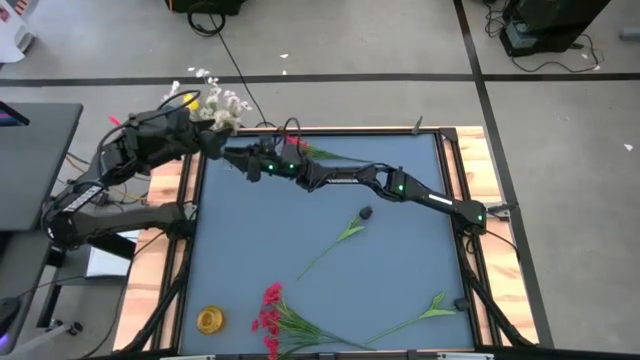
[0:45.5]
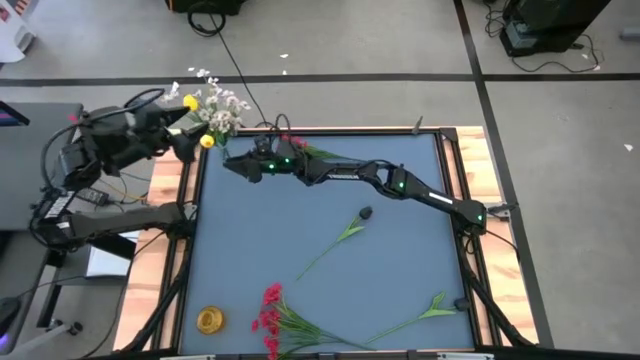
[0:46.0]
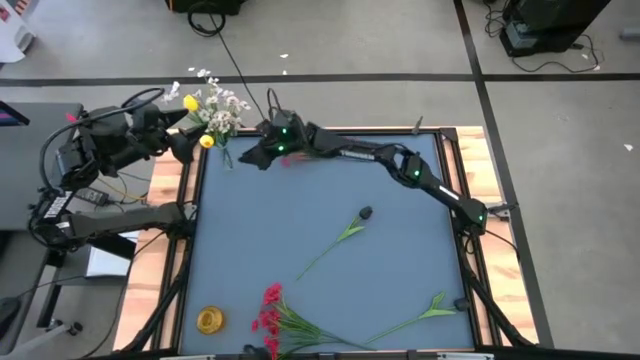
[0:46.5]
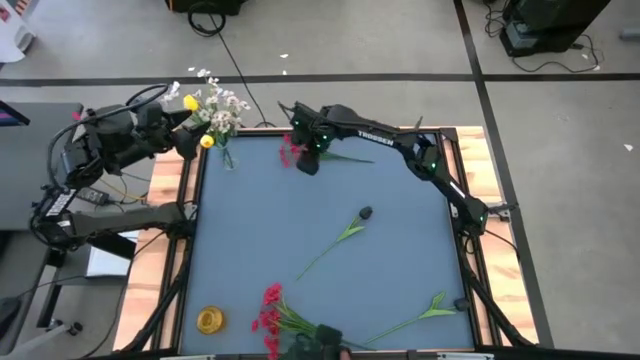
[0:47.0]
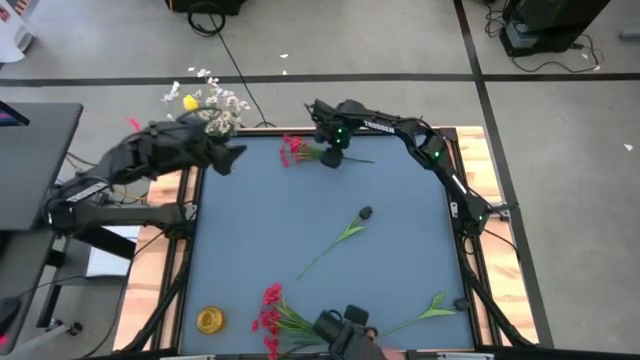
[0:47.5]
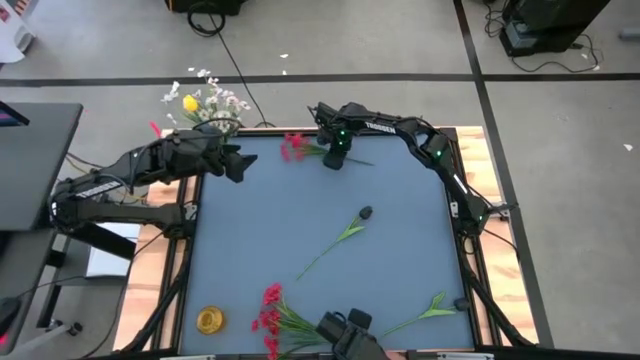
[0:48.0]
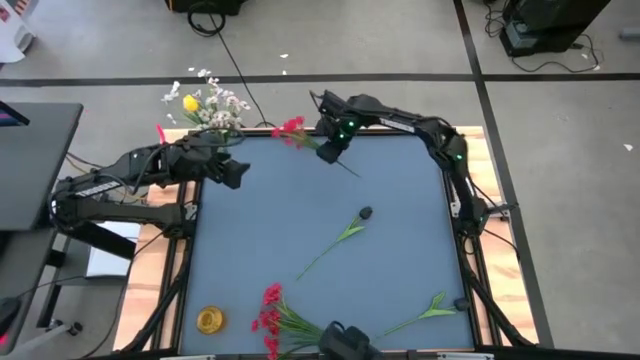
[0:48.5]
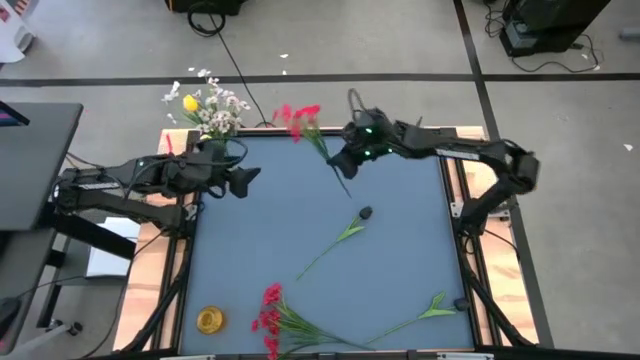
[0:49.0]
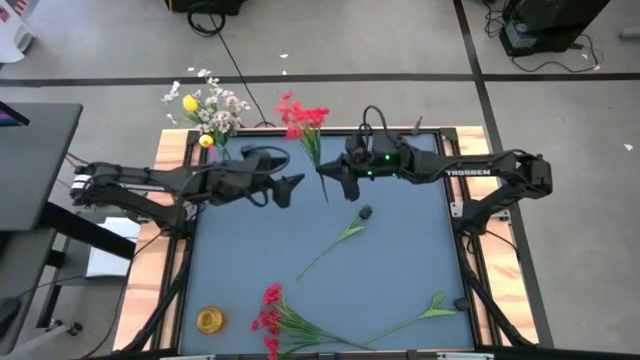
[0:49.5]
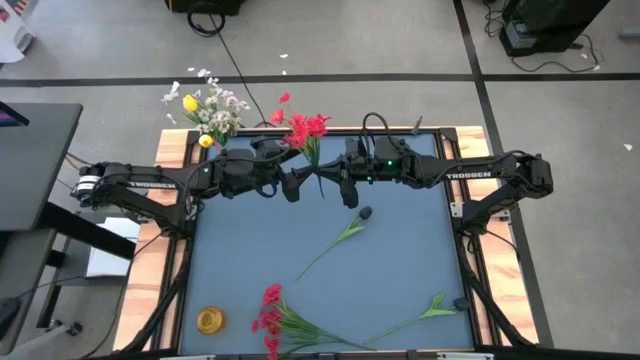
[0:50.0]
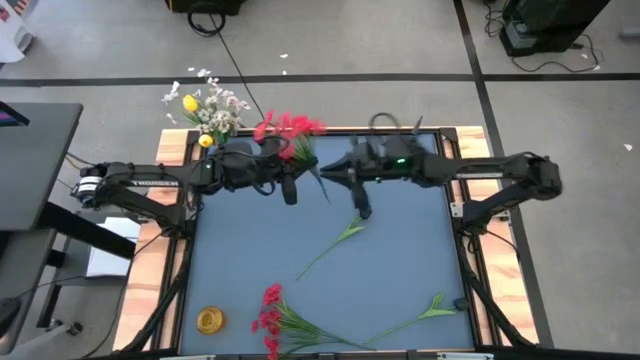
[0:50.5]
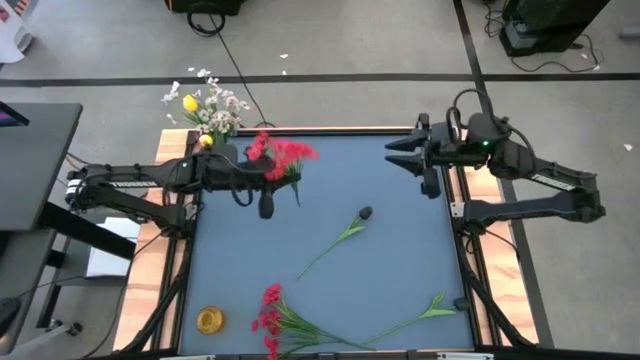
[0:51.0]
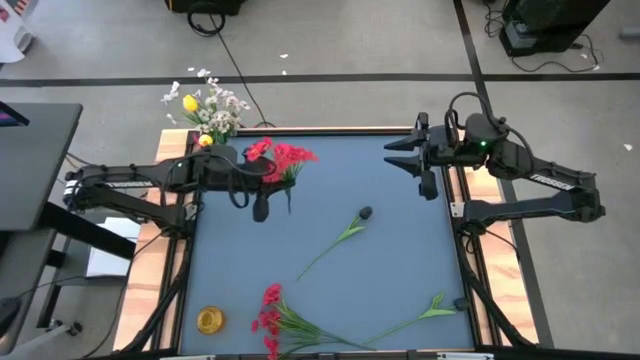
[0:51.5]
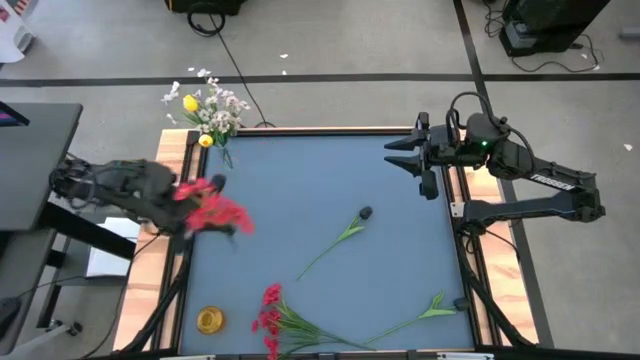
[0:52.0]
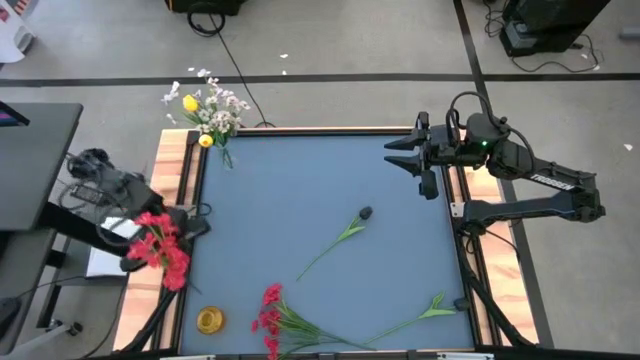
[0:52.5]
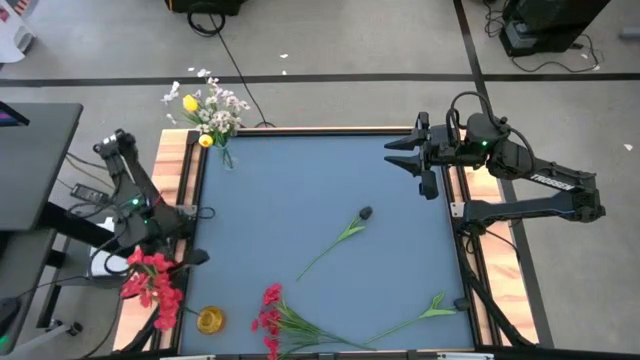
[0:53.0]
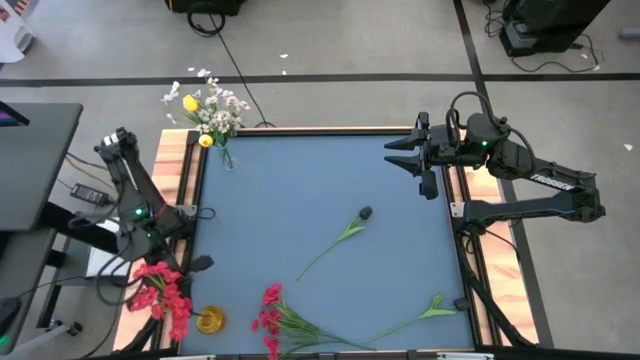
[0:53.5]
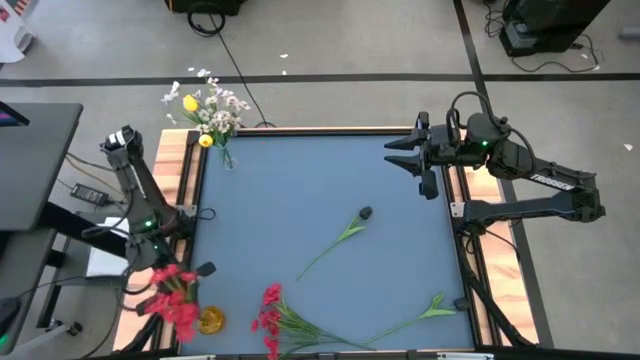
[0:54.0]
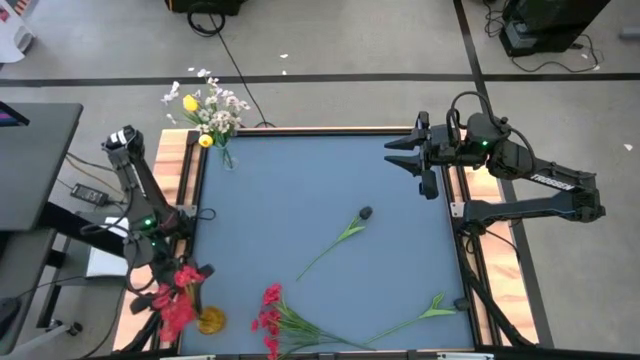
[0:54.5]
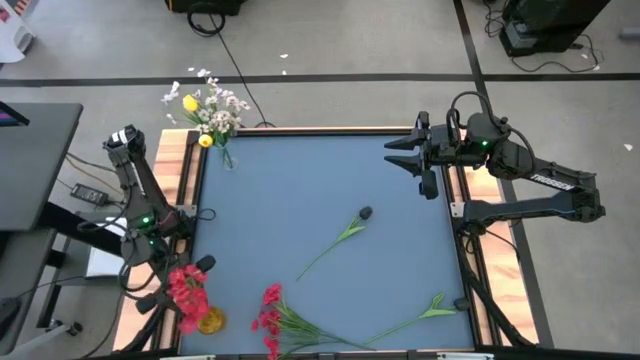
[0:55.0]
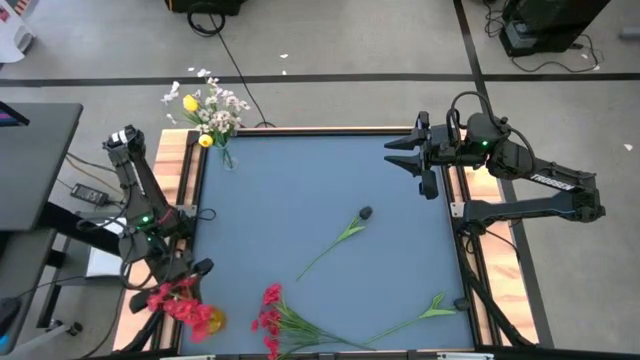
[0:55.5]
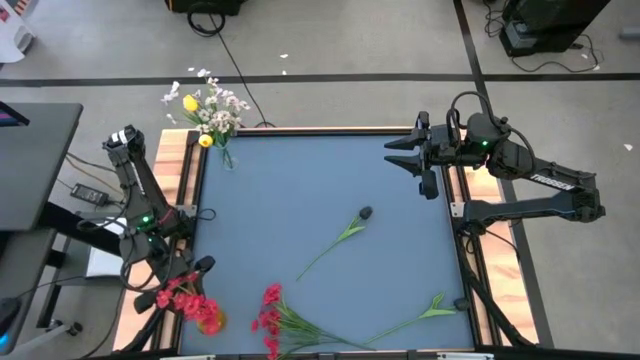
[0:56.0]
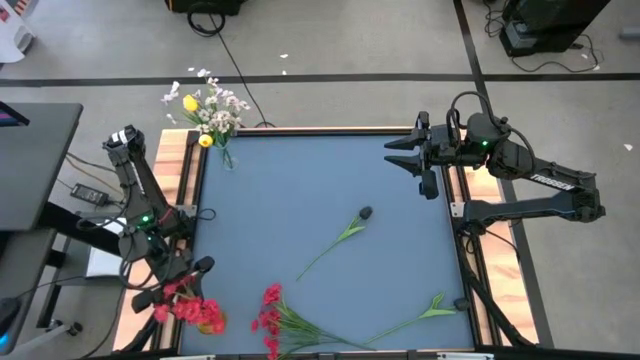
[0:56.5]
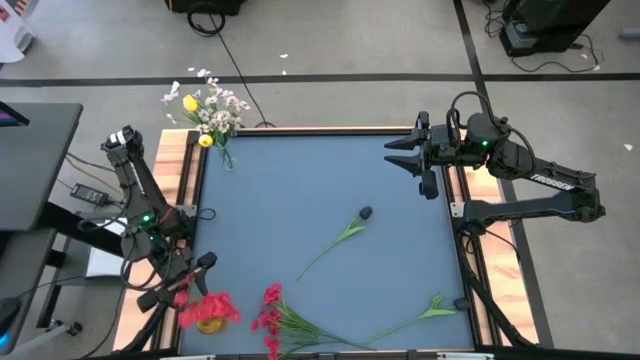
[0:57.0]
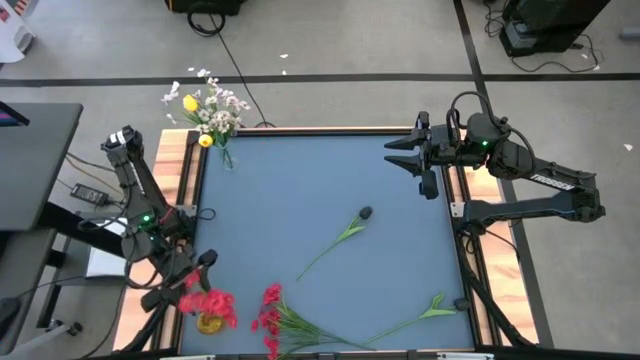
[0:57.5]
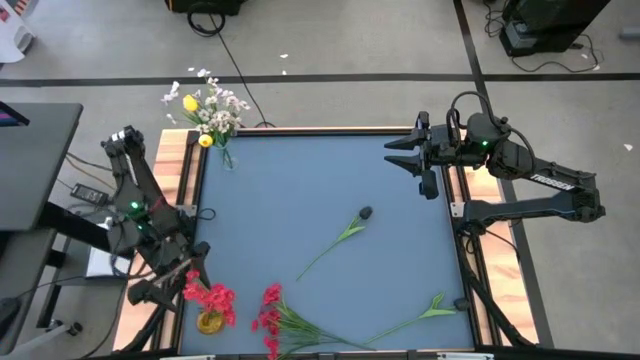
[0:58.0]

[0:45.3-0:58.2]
Task: Sort flowers into vase by color
Put the top red flowers into the yellow vase

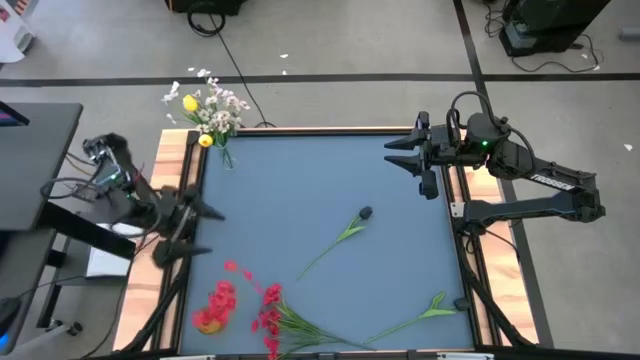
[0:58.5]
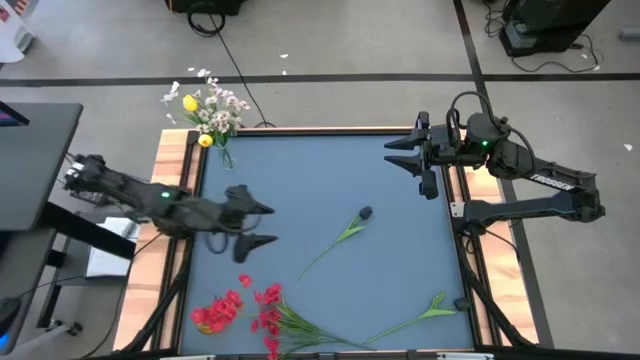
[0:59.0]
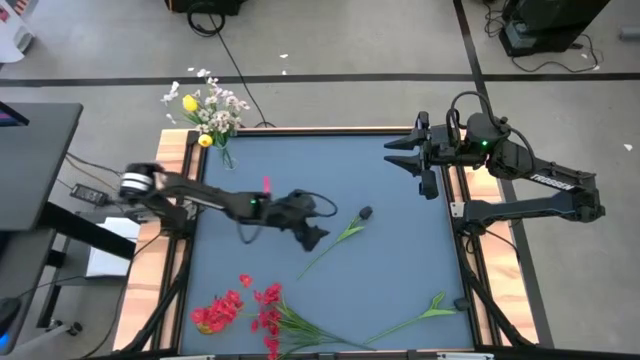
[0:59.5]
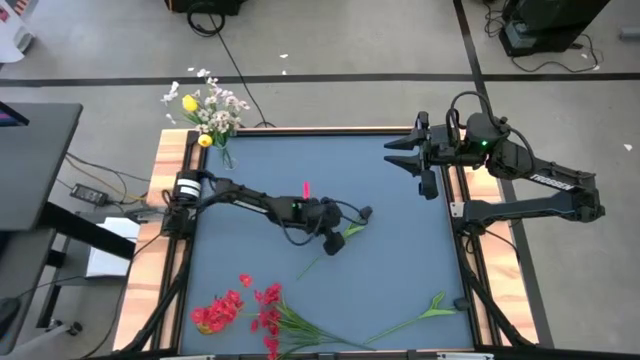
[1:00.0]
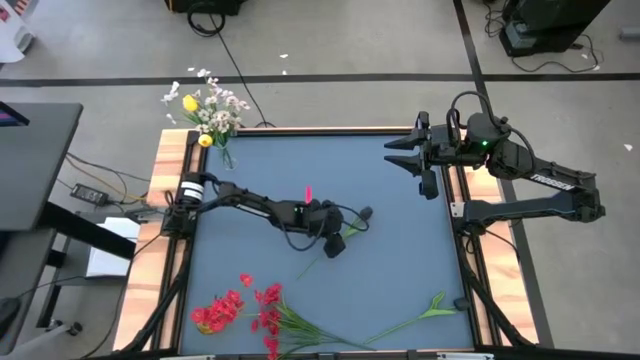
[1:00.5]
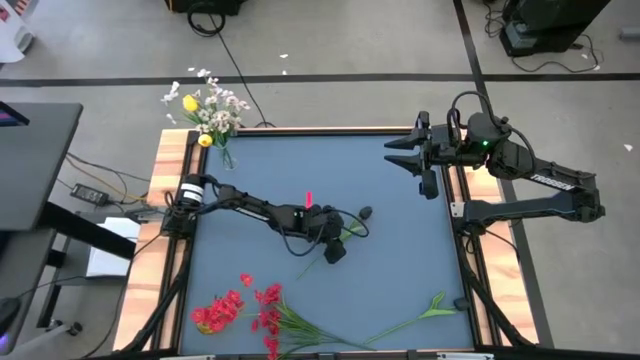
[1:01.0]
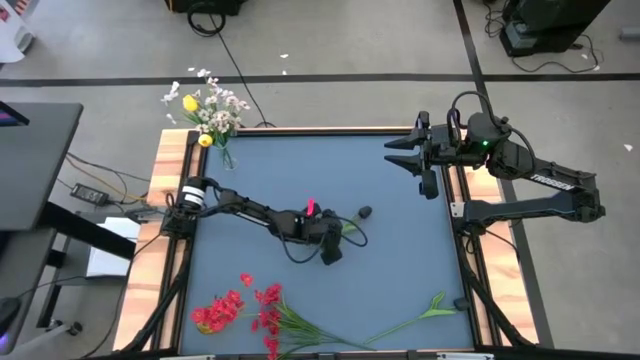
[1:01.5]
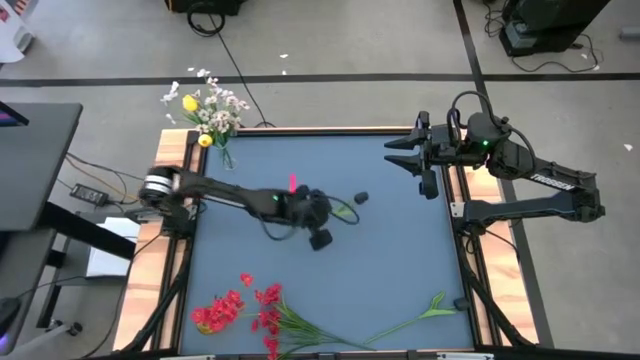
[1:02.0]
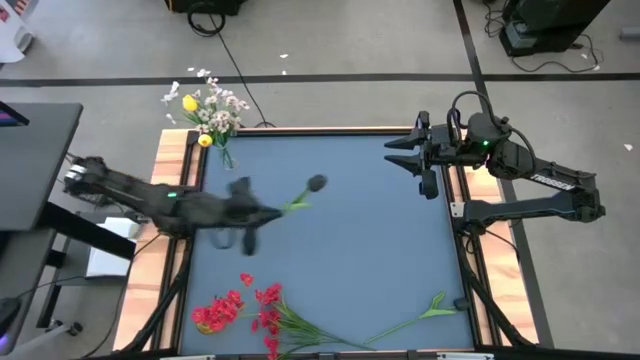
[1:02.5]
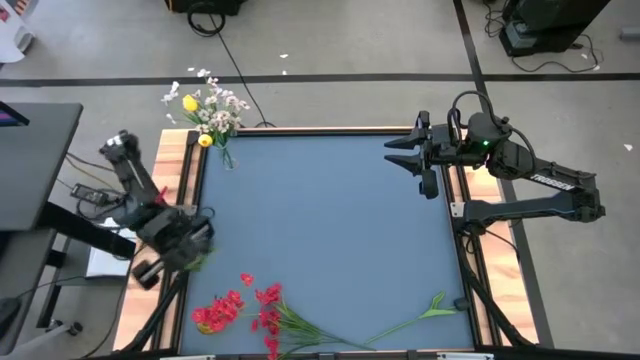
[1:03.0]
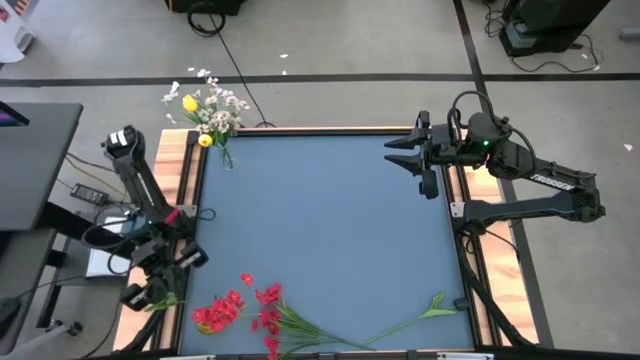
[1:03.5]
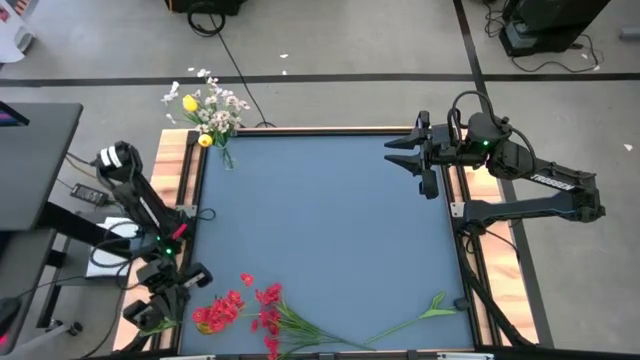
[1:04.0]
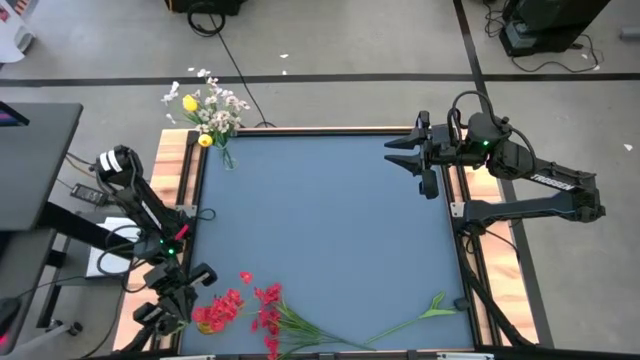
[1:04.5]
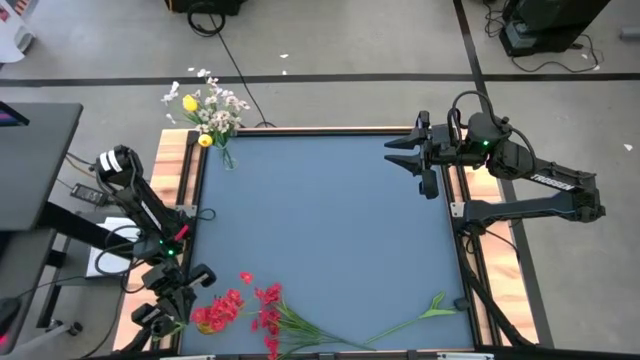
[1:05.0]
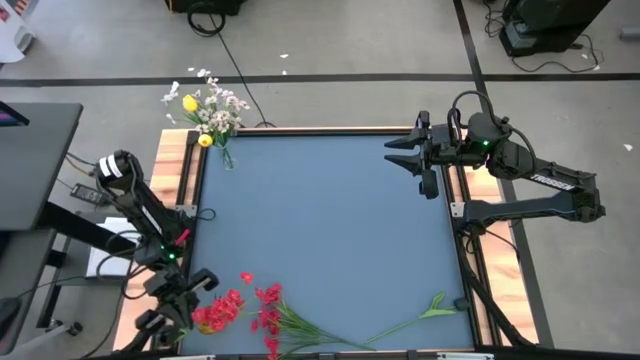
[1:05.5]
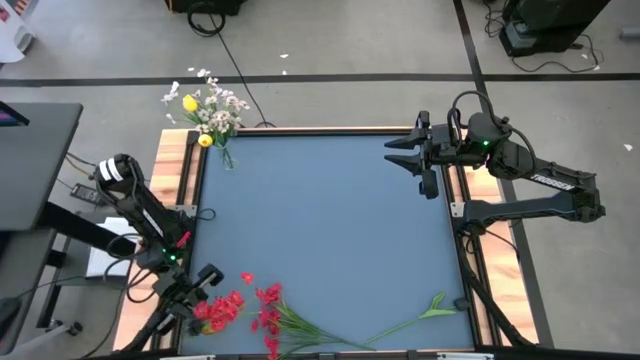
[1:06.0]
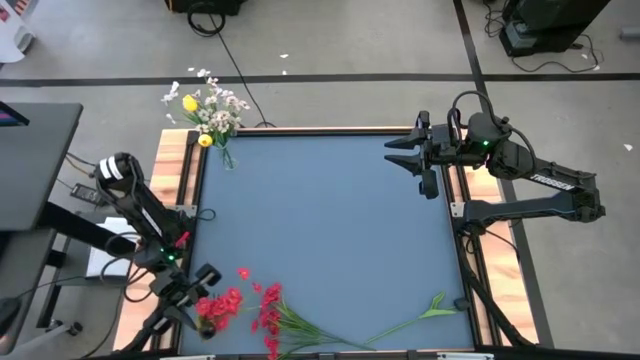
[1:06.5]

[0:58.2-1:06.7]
Put the top black flower into the yellow vase
